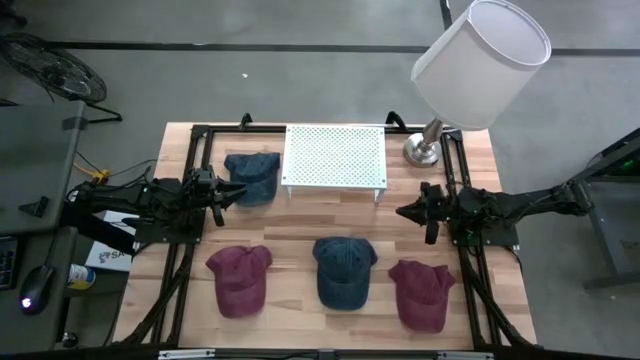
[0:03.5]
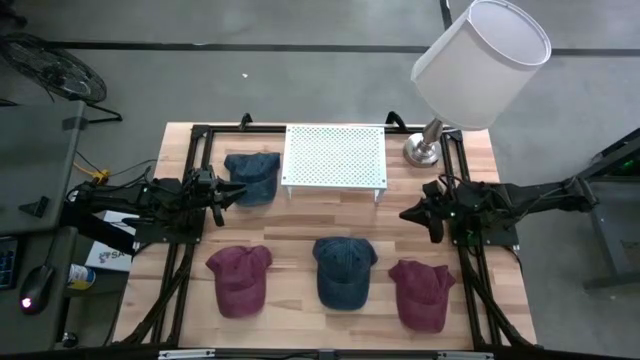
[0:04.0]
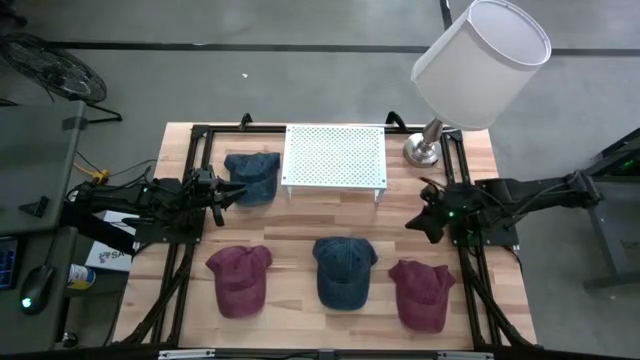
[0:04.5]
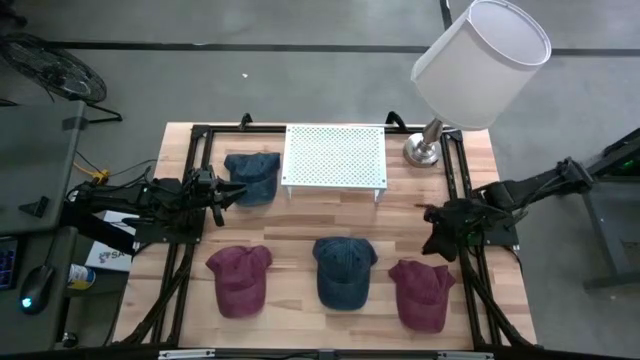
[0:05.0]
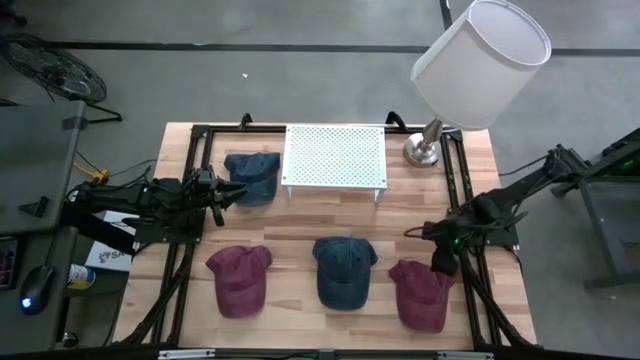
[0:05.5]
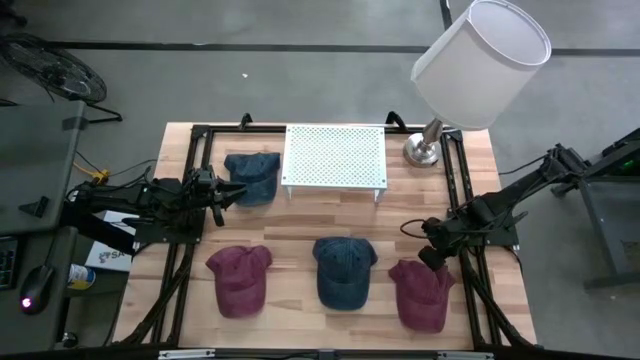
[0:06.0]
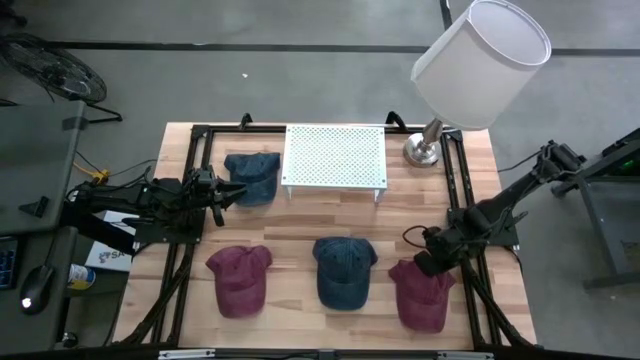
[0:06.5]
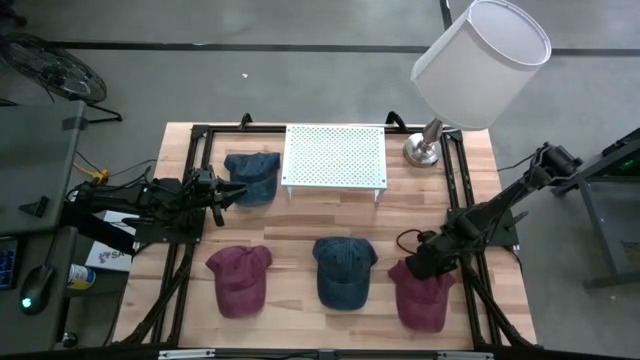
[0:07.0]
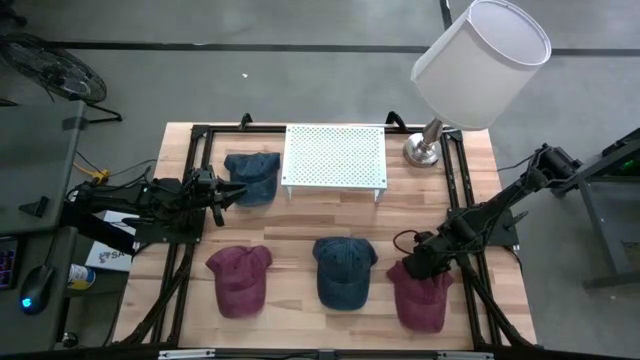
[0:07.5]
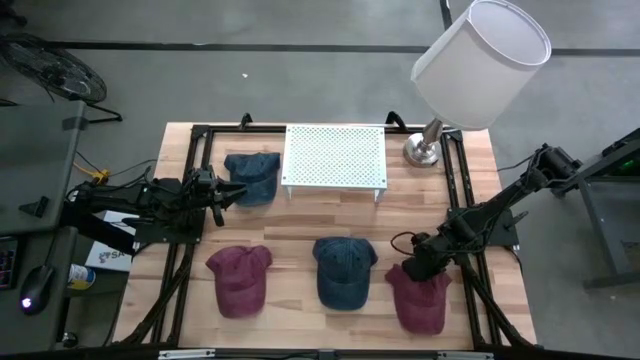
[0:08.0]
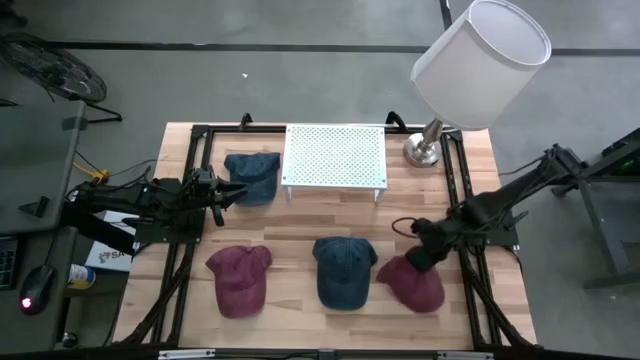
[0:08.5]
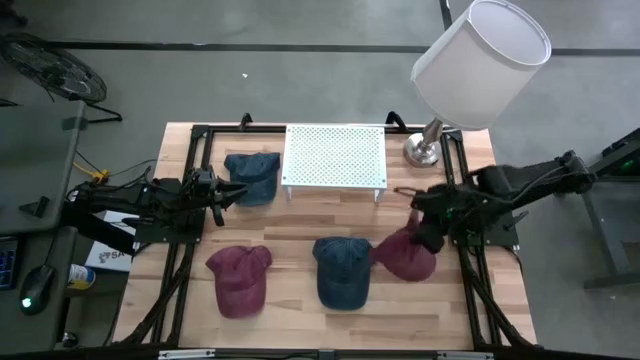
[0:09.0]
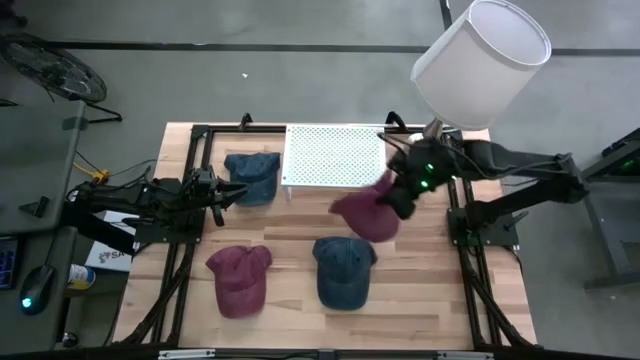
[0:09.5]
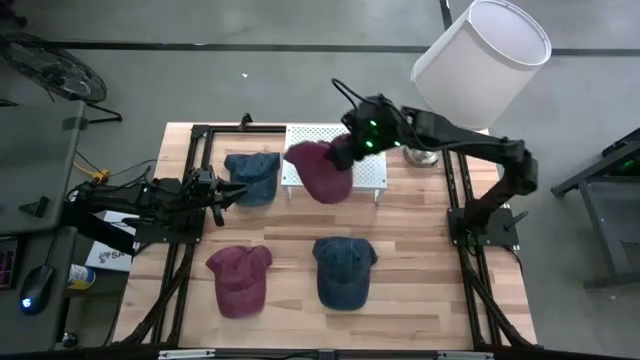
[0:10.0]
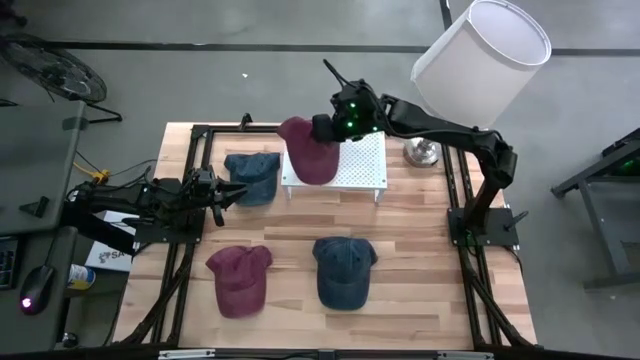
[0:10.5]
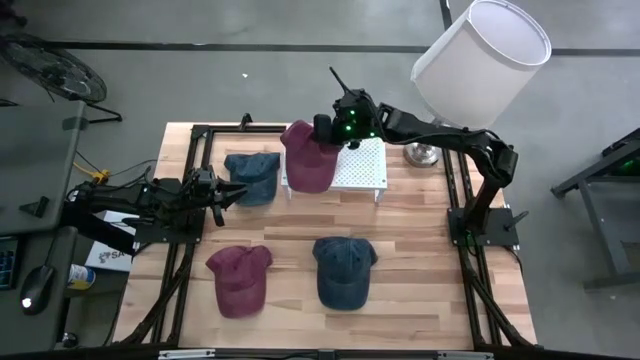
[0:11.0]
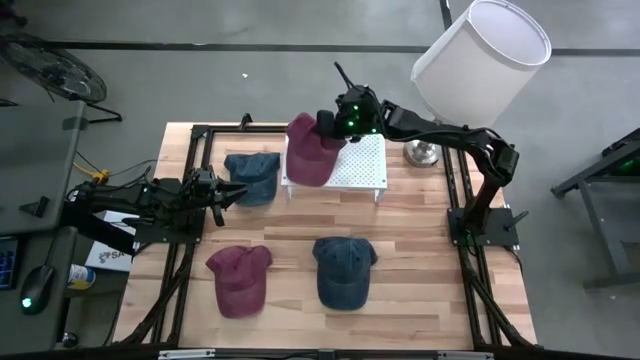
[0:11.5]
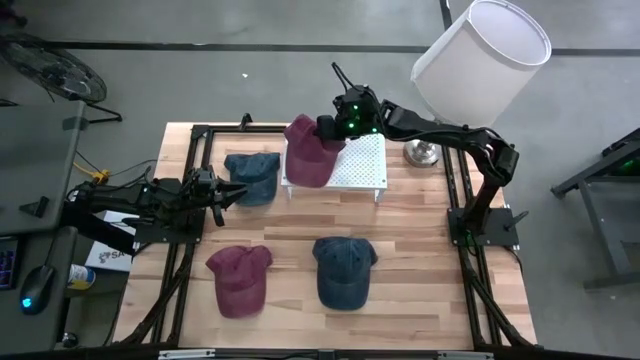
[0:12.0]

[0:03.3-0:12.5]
Task: Pick & Place hat
Put the right red cap on the shelf

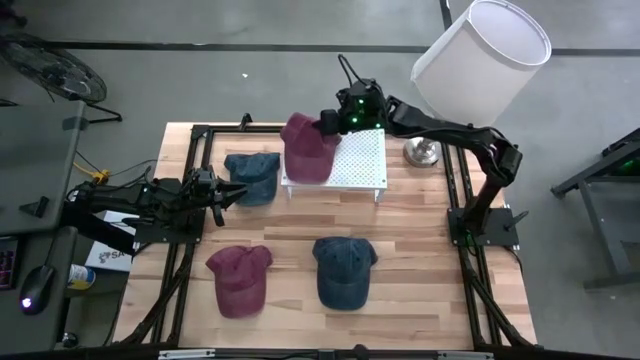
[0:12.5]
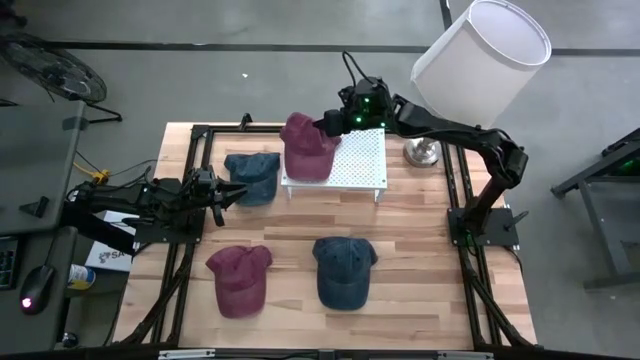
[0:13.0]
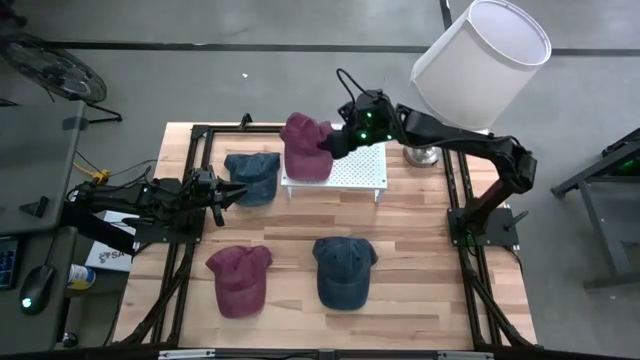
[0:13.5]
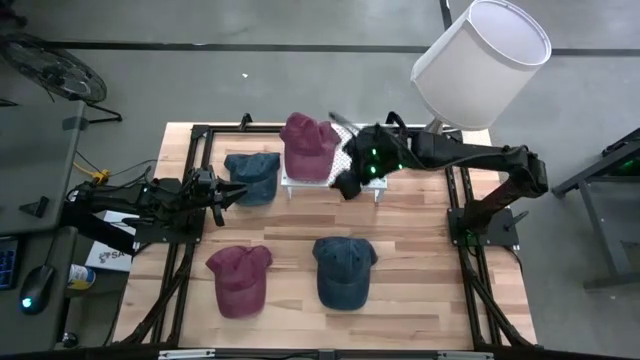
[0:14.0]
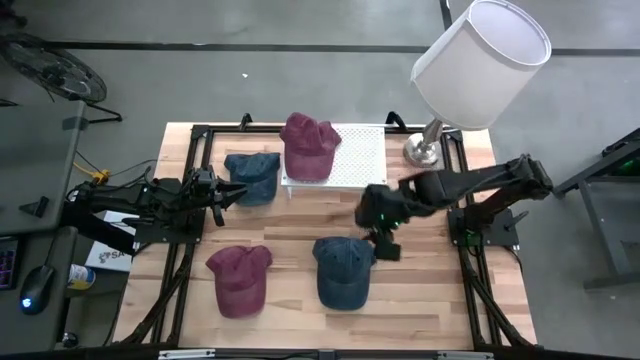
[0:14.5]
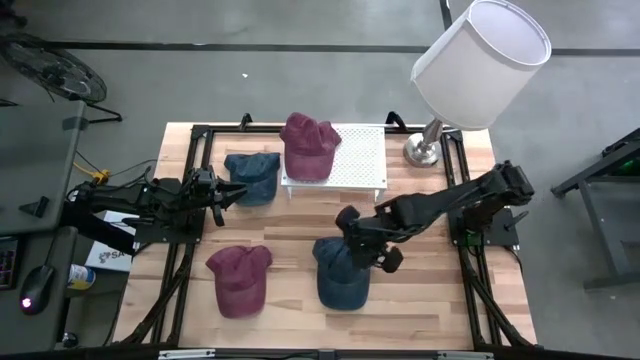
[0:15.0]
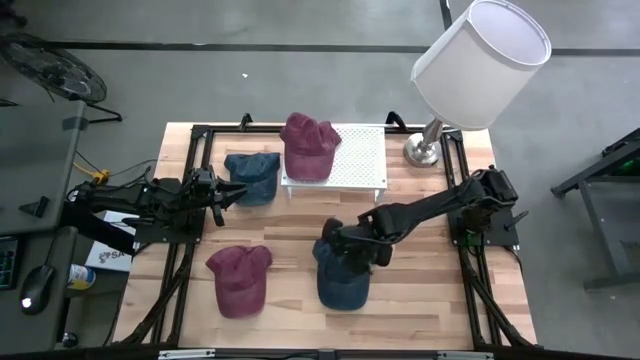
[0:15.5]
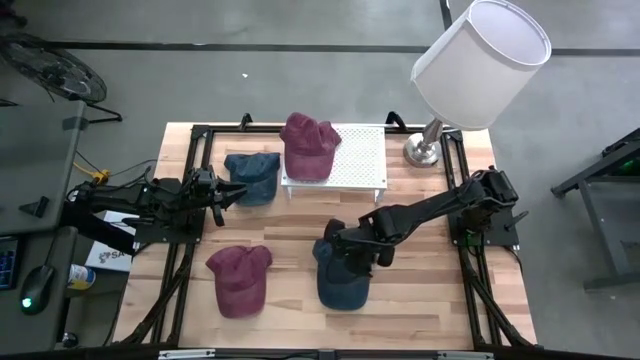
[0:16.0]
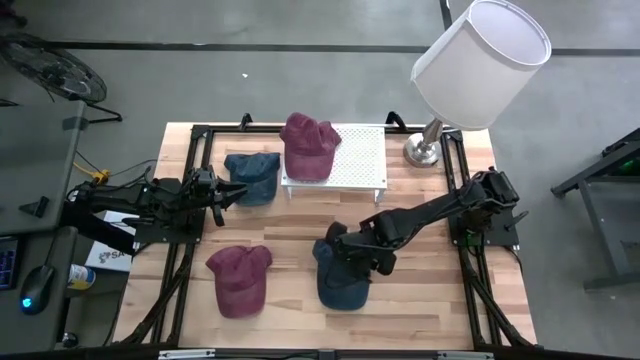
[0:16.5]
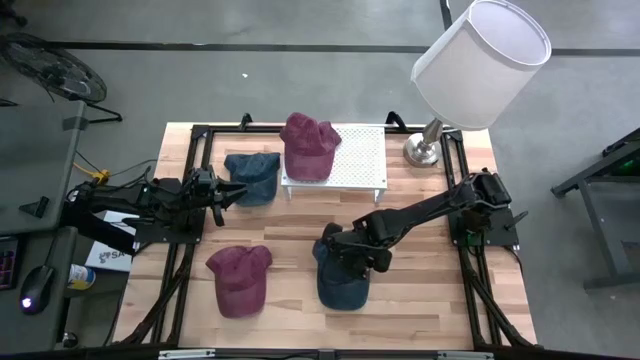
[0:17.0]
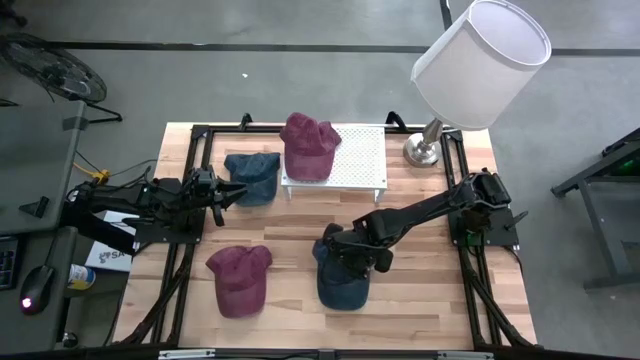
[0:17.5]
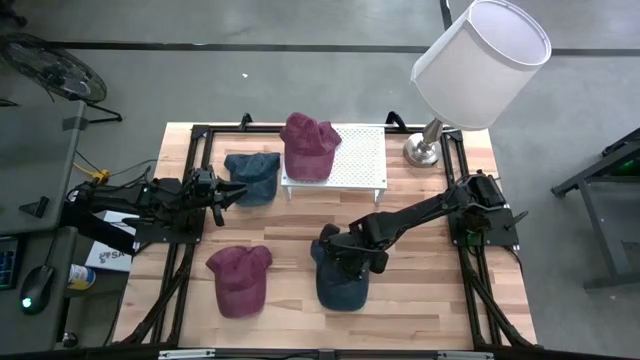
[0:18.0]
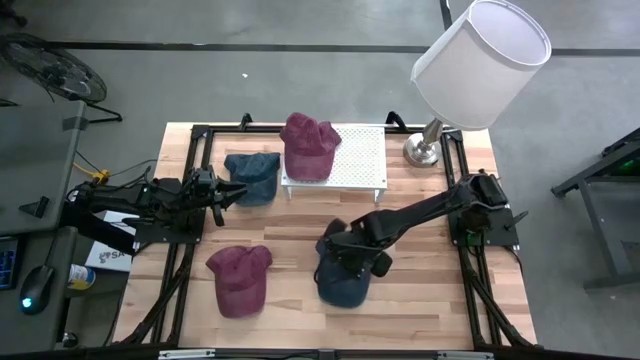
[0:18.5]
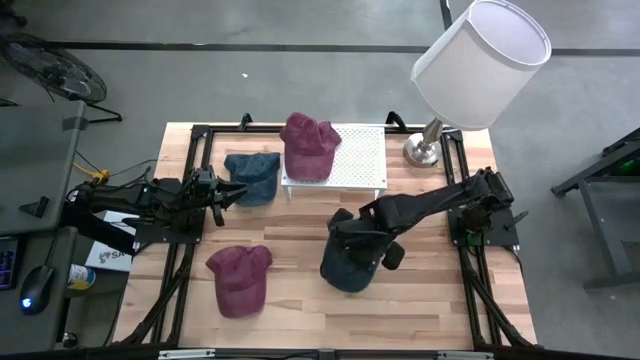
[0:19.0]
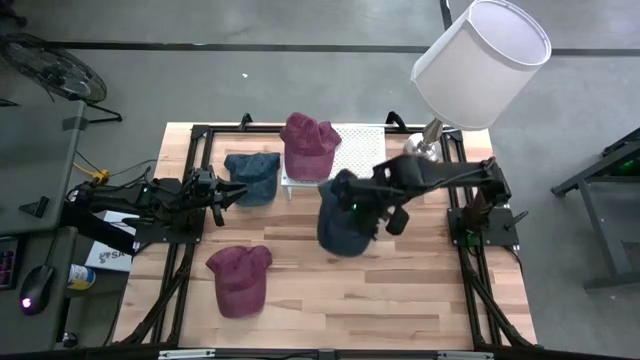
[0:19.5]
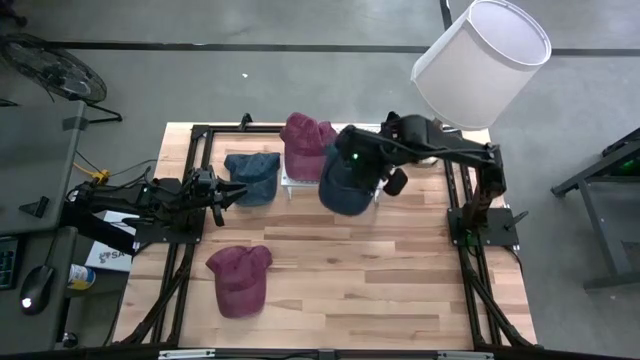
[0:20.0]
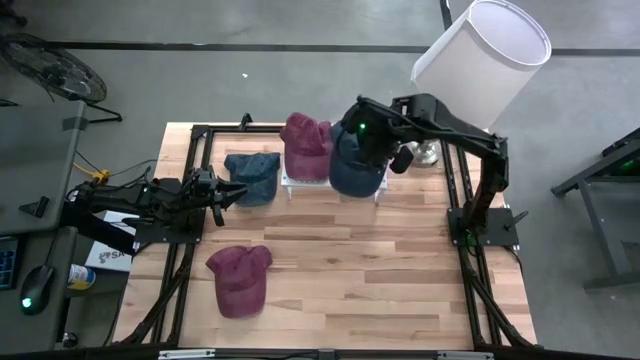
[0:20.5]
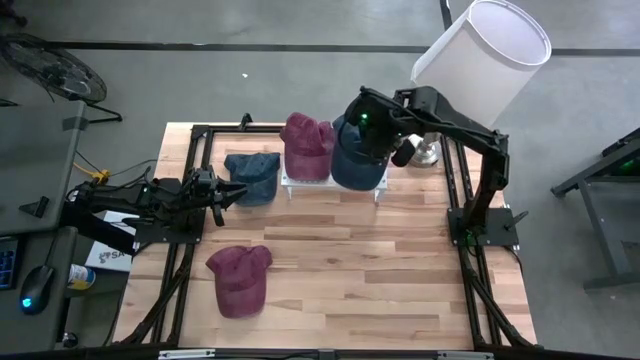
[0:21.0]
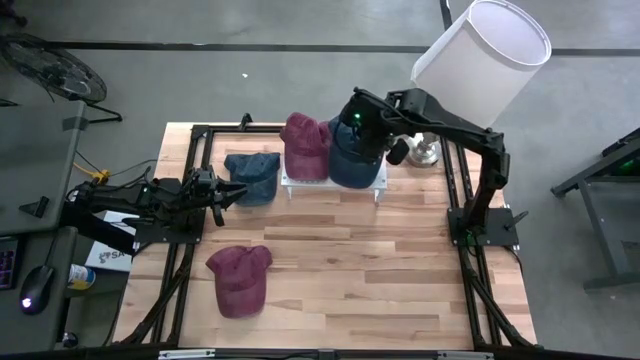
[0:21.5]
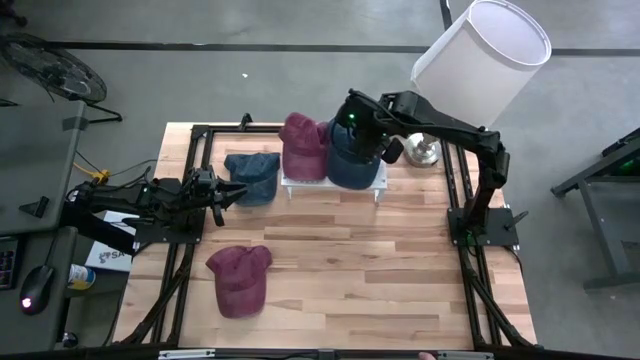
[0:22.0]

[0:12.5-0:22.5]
Put the bottom blue cap on the shelf

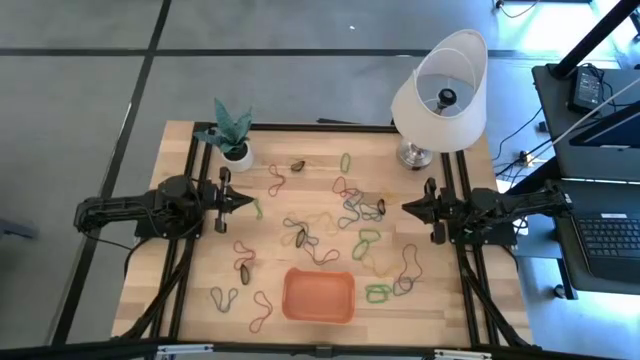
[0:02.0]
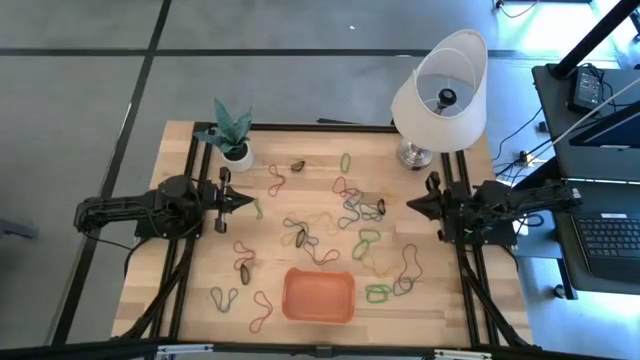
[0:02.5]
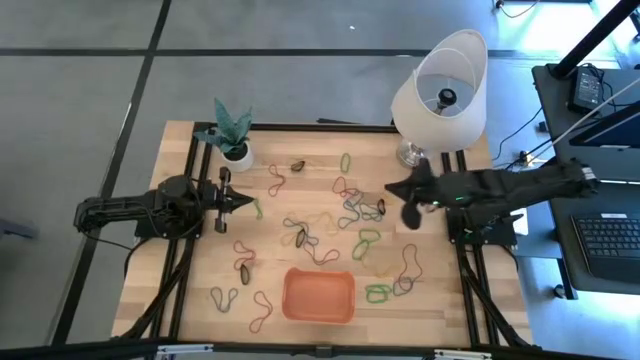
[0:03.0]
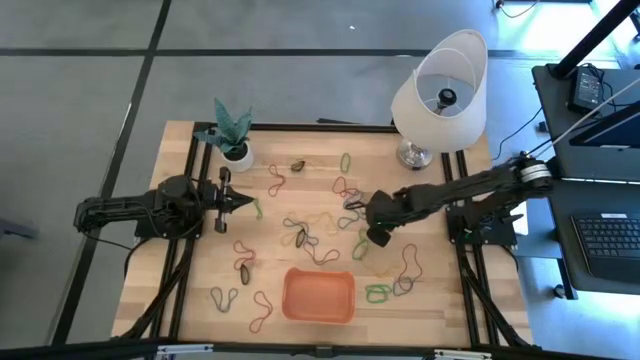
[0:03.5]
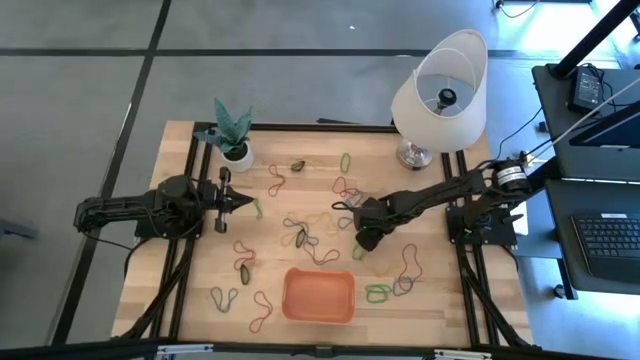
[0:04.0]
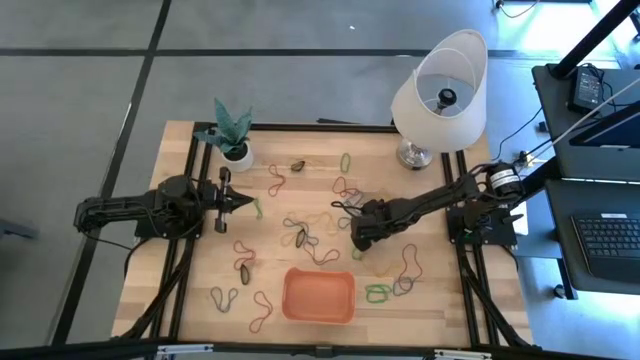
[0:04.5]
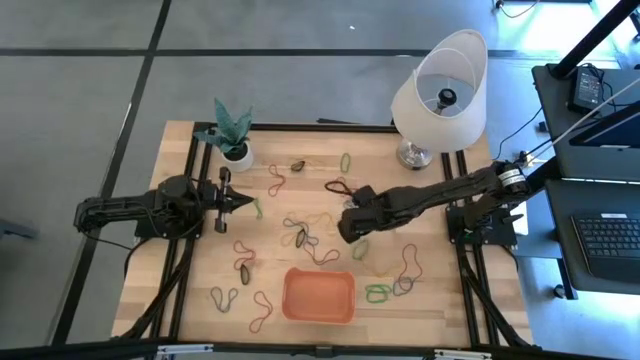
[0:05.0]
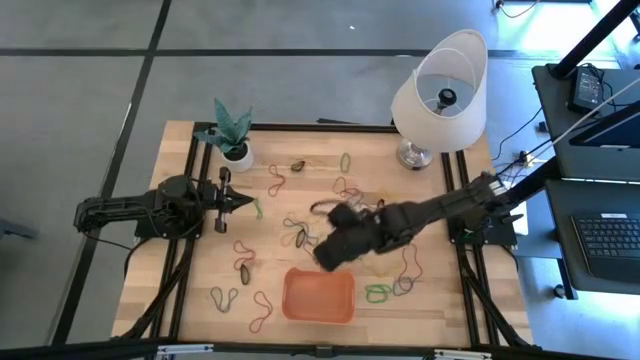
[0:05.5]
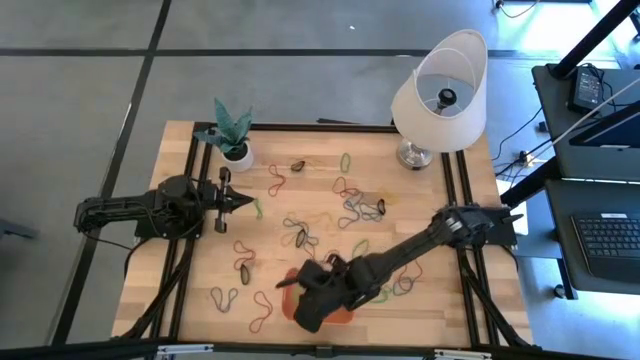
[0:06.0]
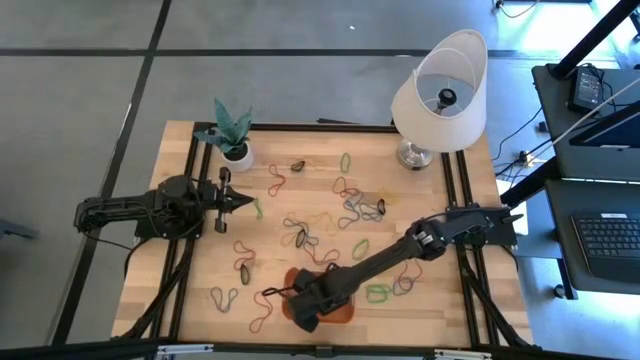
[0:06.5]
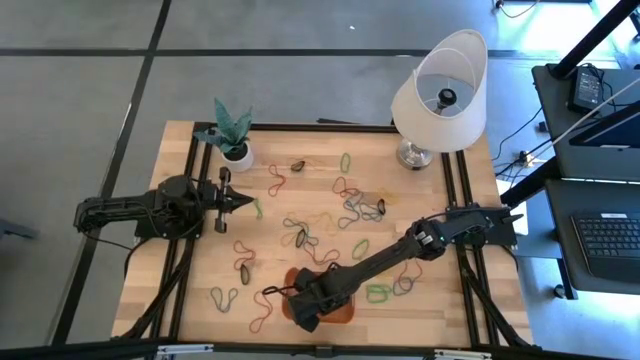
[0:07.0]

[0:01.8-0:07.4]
Task: Pick and place rubber bands into bin
Put the green rubber band into the bin
